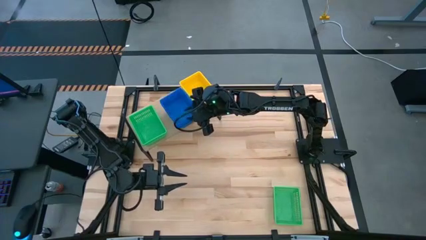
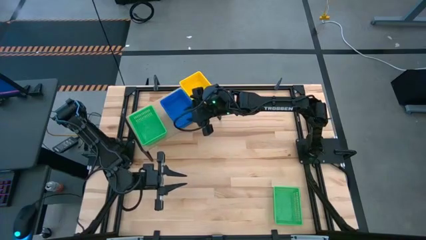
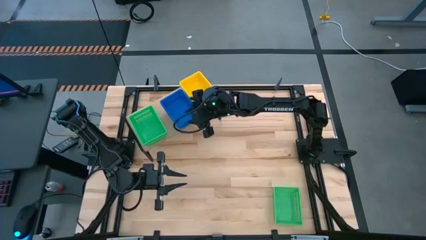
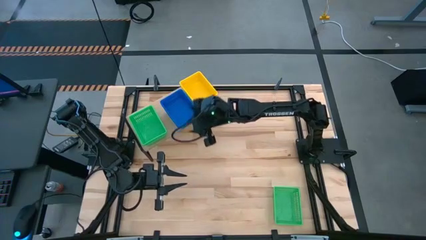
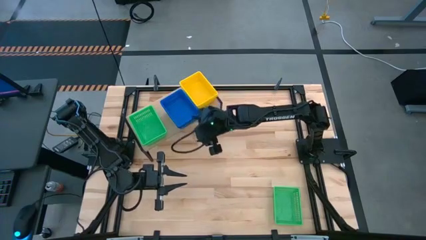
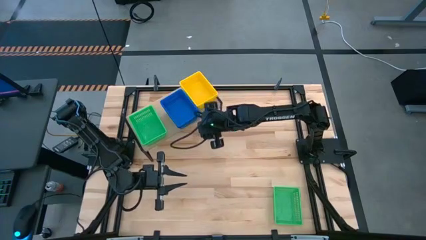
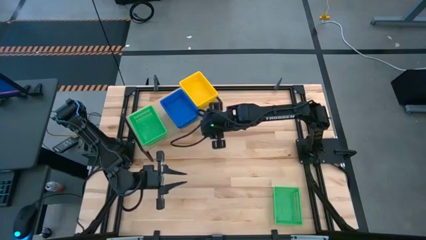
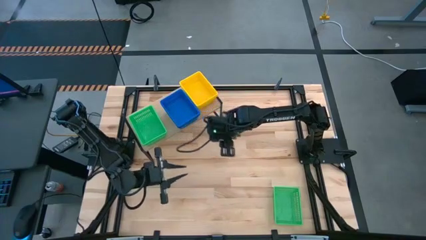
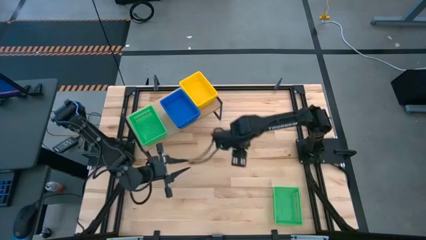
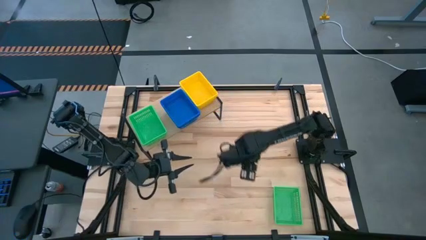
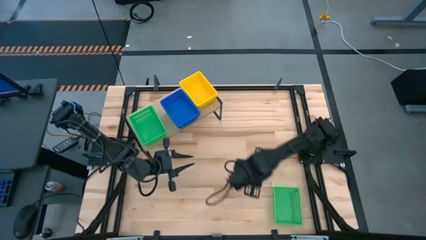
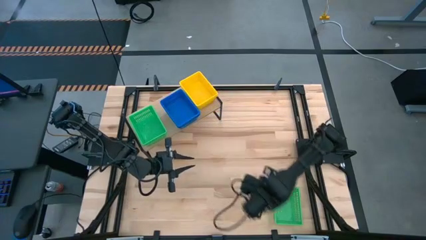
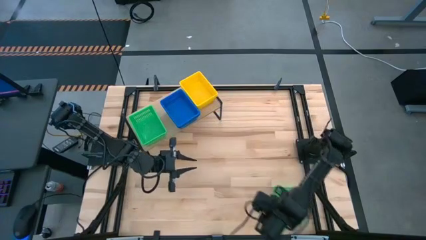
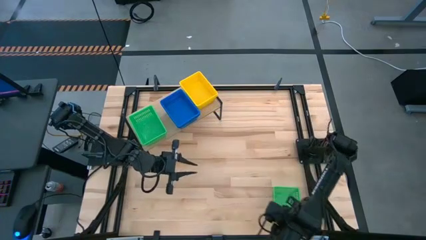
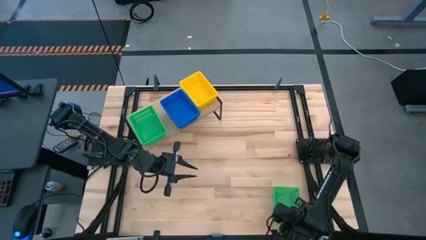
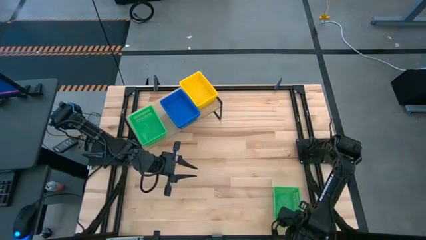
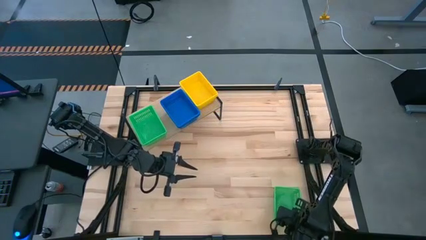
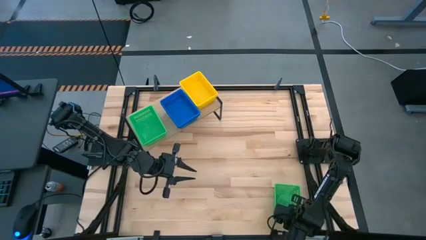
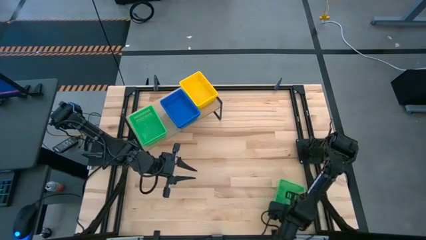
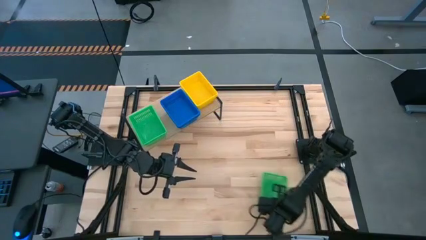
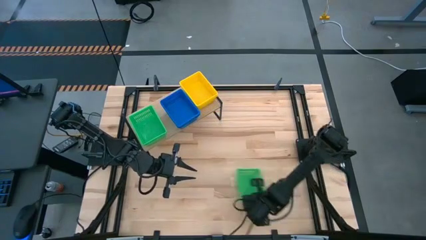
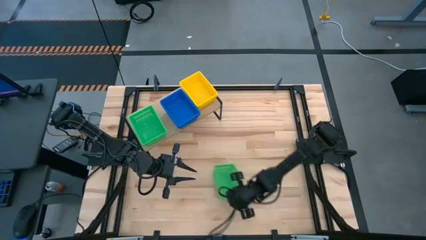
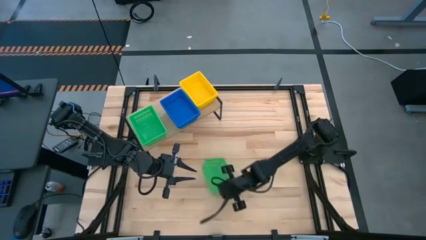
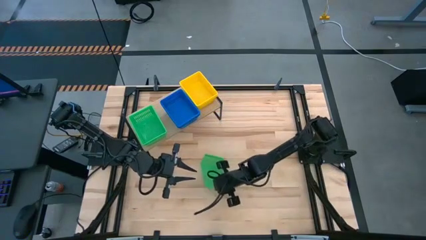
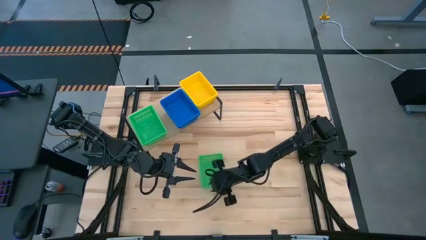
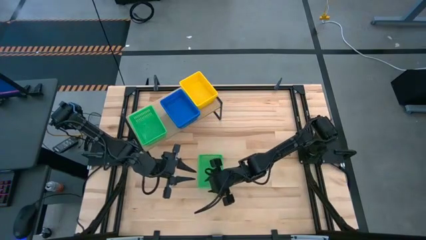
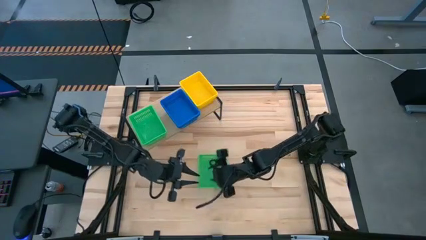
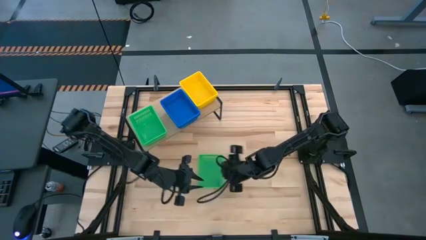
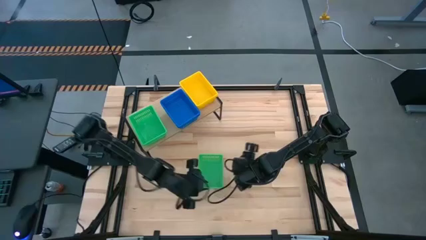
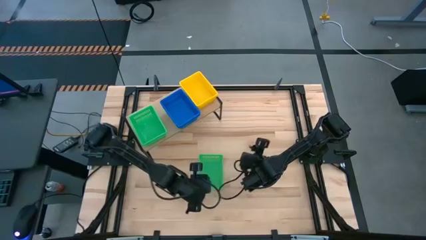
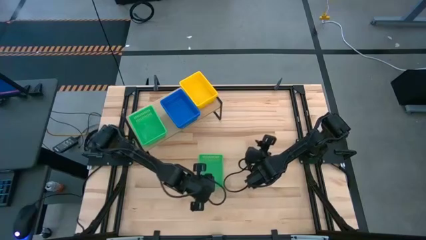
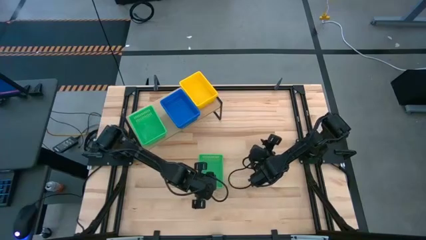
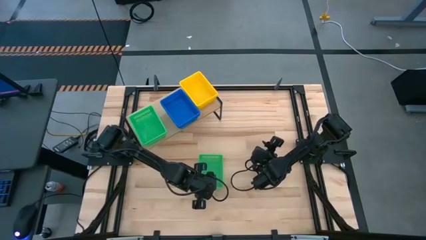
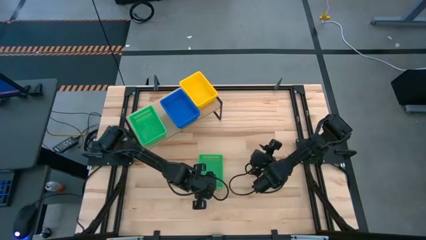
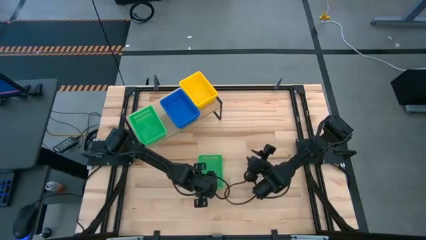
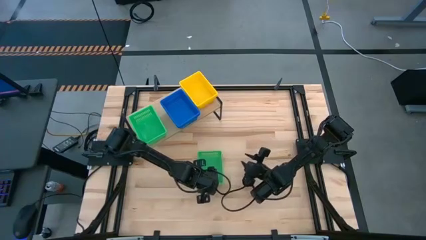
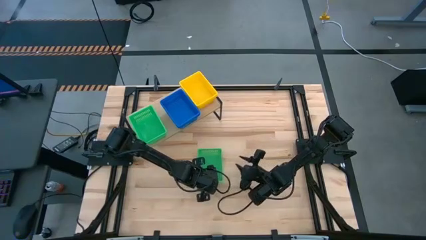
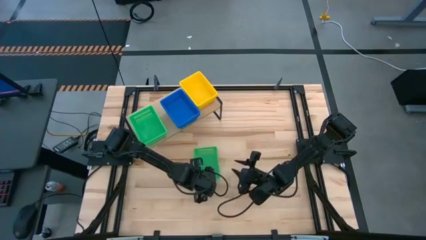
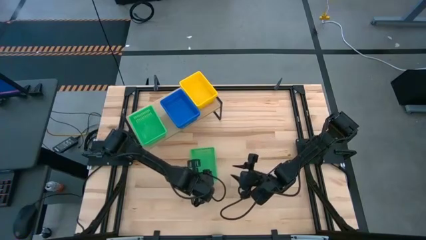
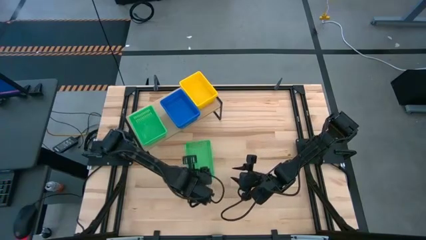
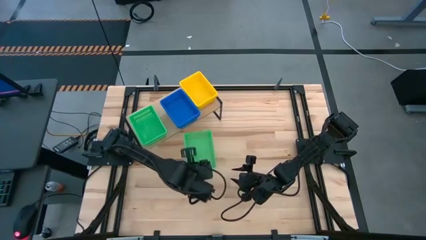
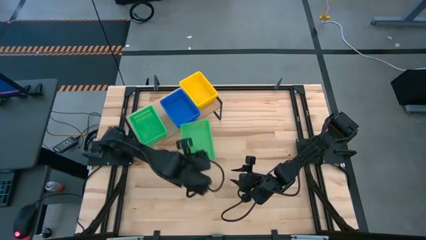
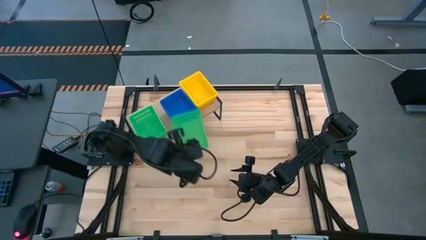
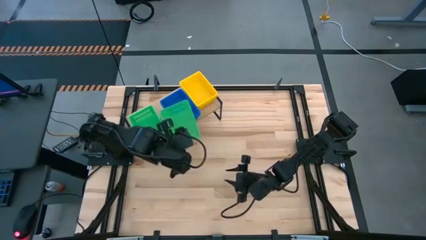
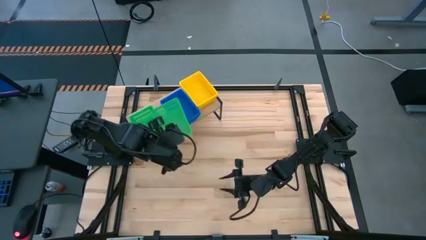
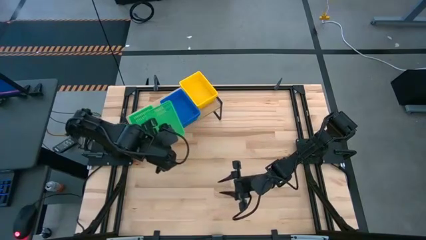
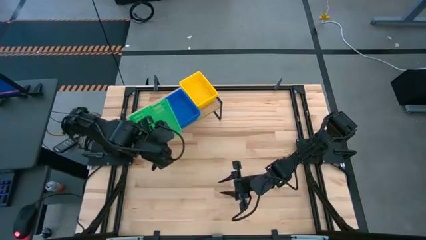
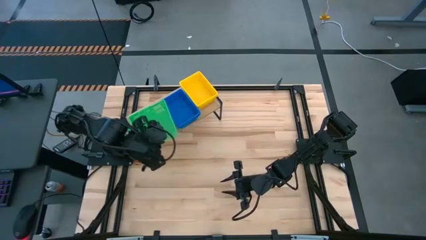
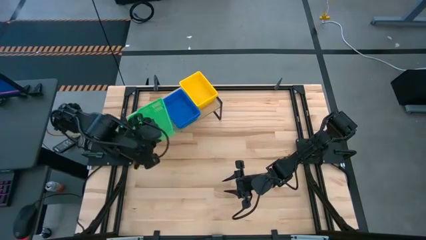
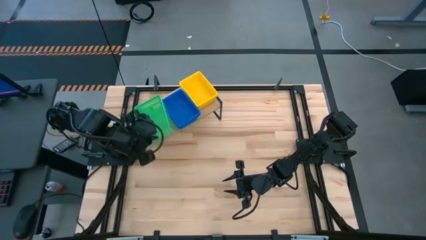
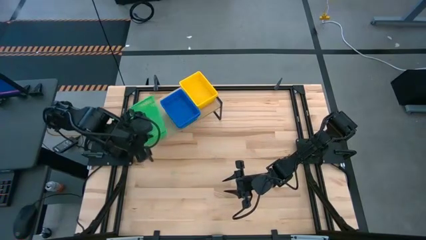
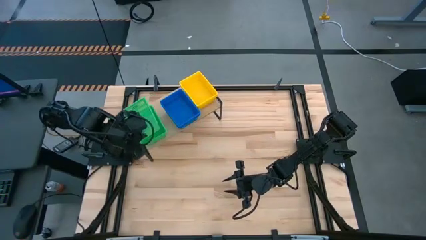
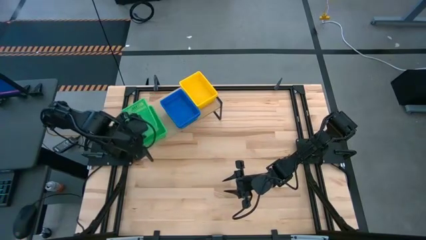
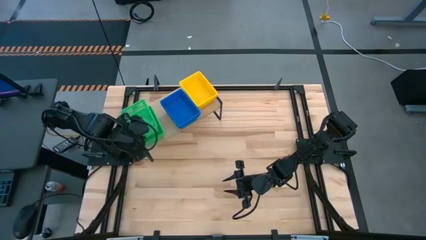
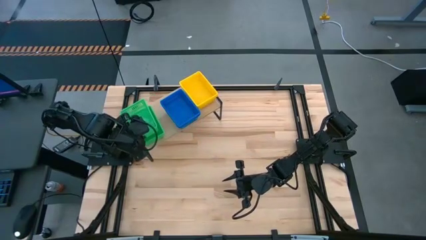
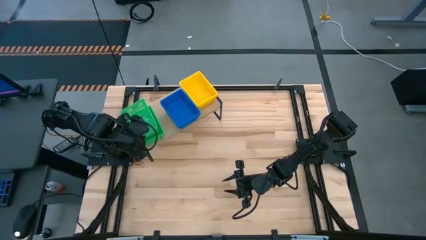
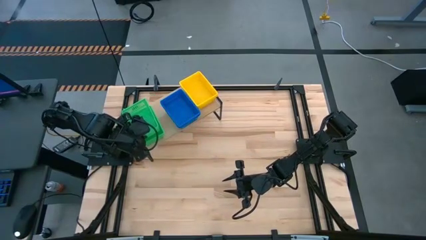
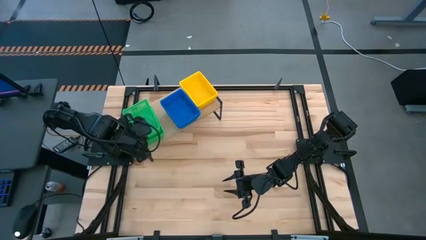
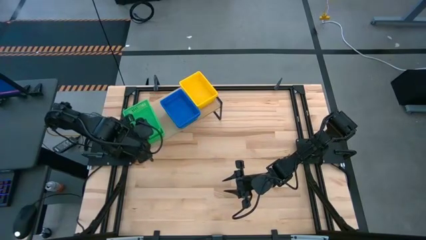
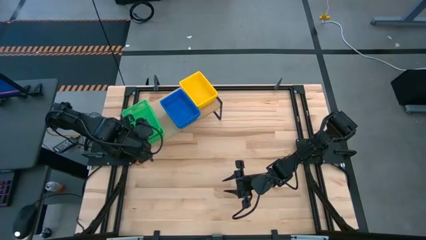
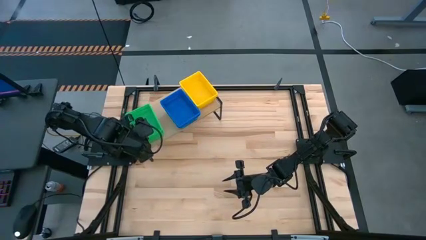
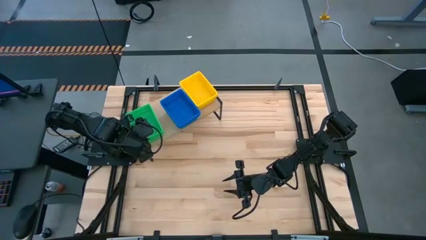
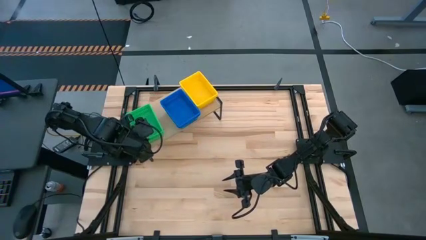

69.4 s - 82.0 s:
Task: Stack baskets on shelf by color
Stack the green basket on top of the green baskets on the shelf
